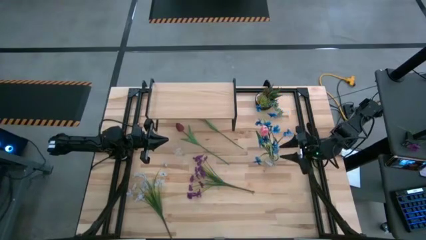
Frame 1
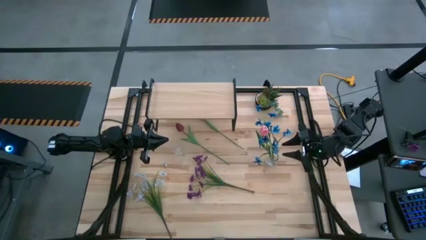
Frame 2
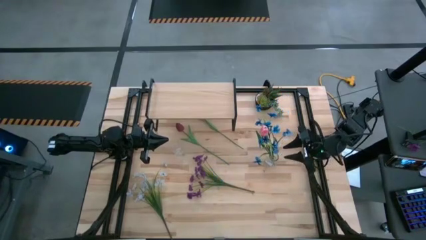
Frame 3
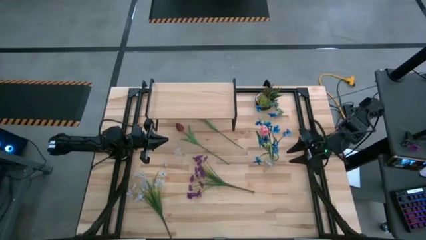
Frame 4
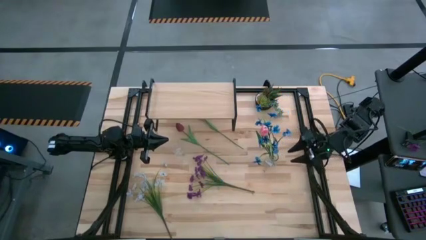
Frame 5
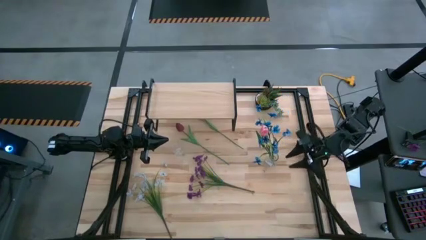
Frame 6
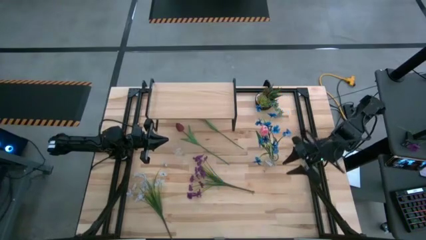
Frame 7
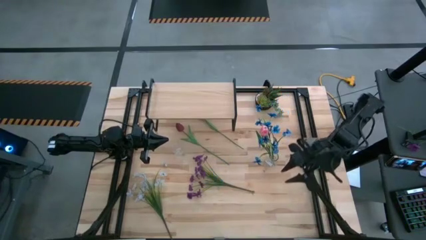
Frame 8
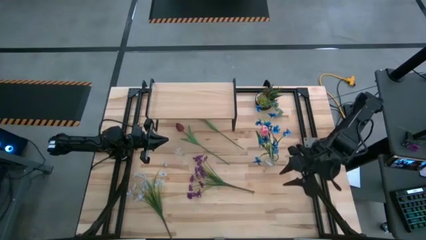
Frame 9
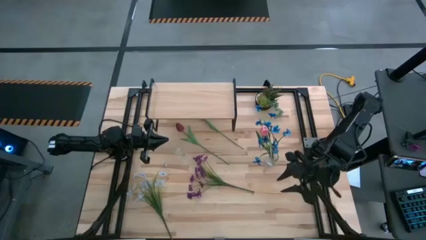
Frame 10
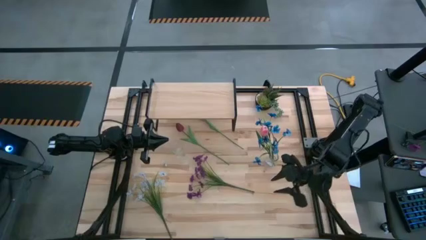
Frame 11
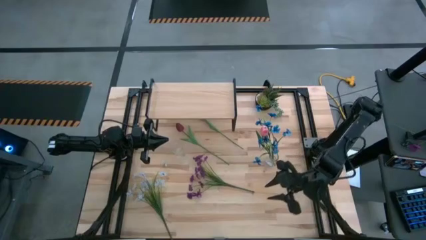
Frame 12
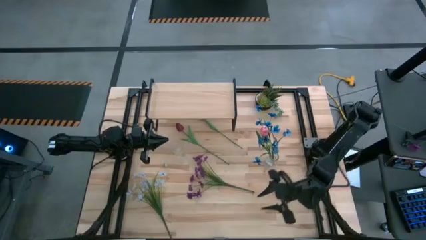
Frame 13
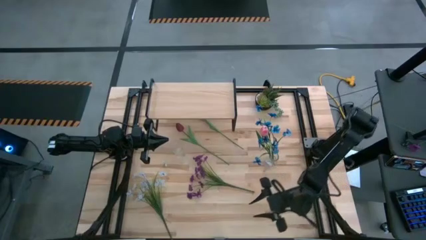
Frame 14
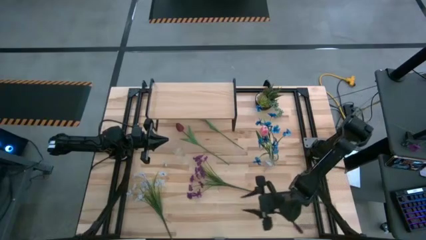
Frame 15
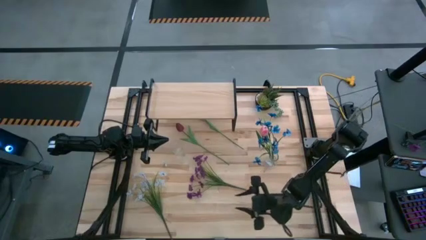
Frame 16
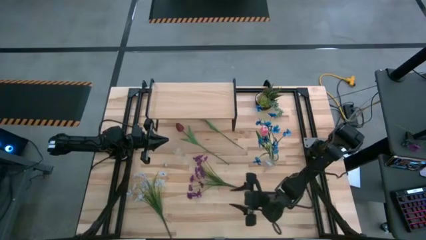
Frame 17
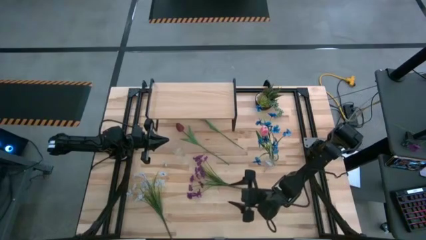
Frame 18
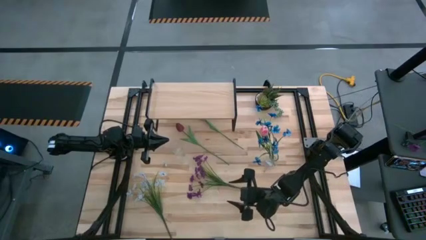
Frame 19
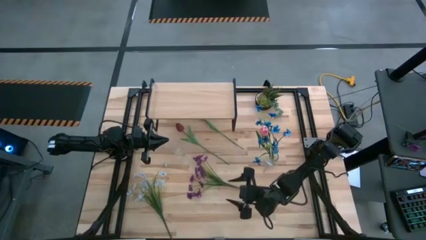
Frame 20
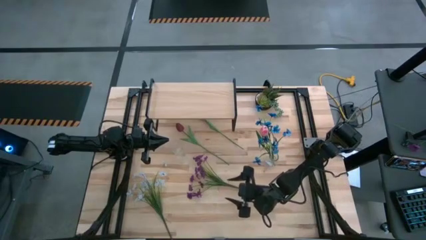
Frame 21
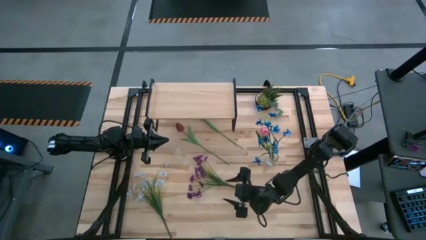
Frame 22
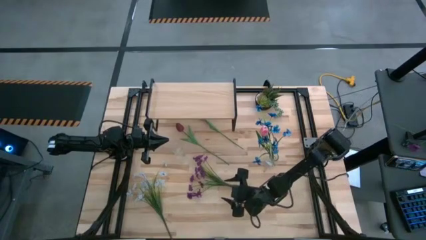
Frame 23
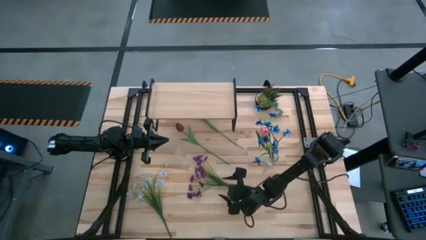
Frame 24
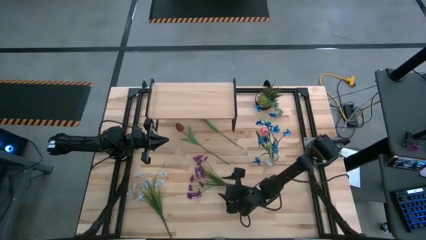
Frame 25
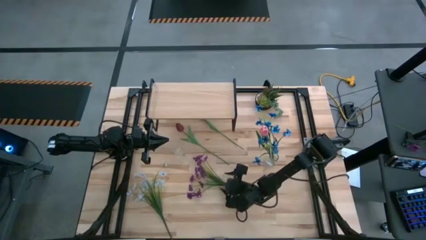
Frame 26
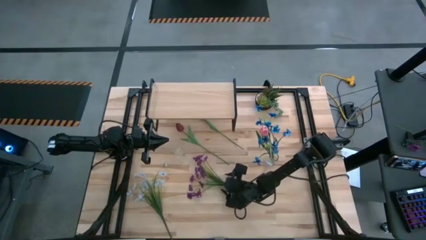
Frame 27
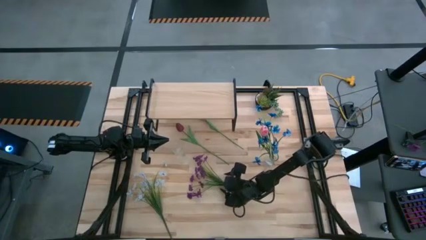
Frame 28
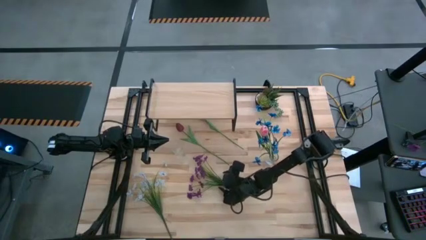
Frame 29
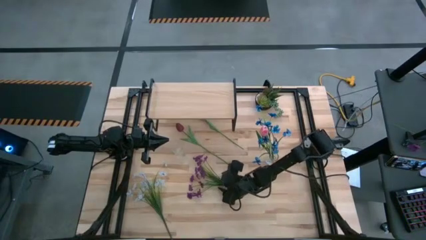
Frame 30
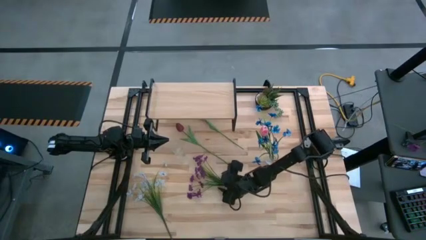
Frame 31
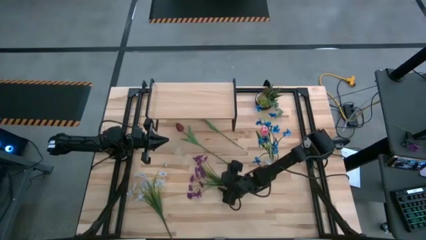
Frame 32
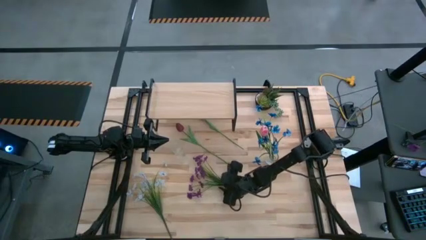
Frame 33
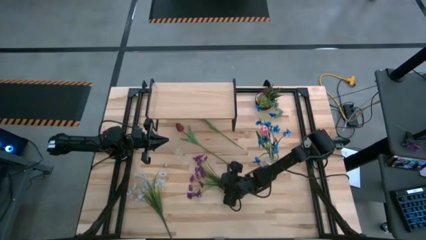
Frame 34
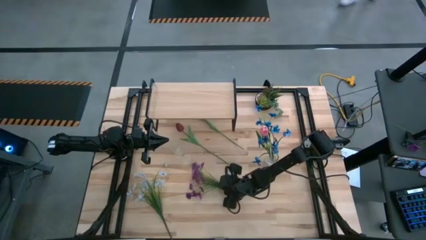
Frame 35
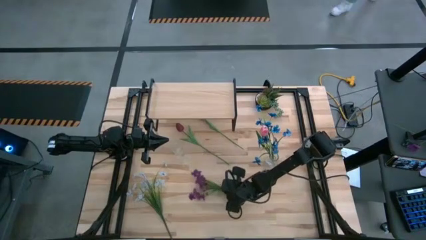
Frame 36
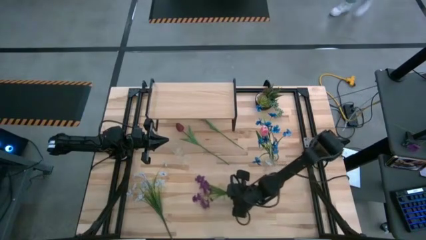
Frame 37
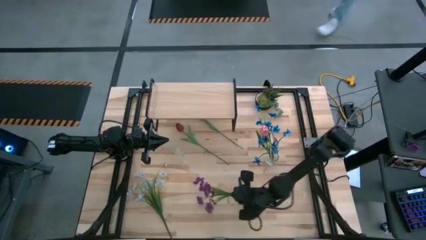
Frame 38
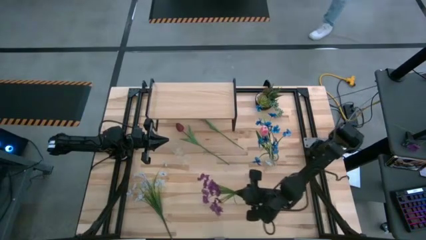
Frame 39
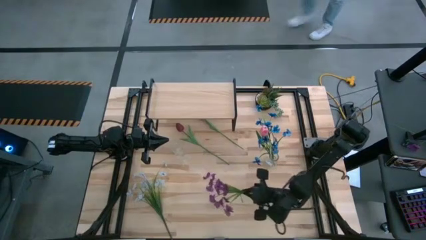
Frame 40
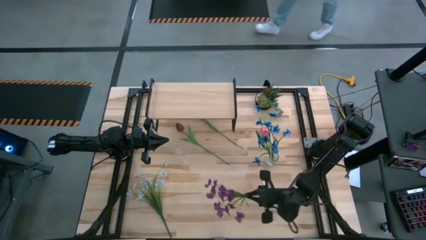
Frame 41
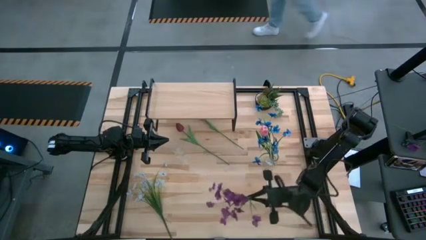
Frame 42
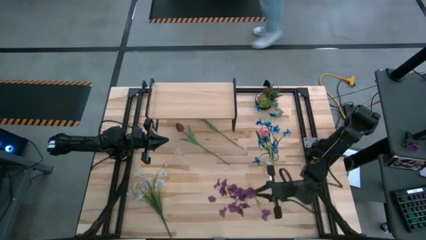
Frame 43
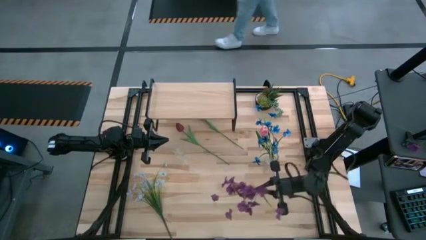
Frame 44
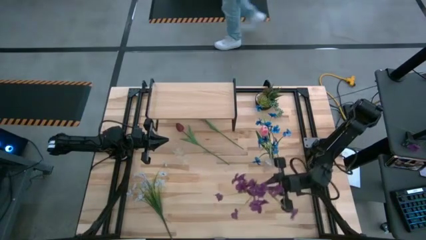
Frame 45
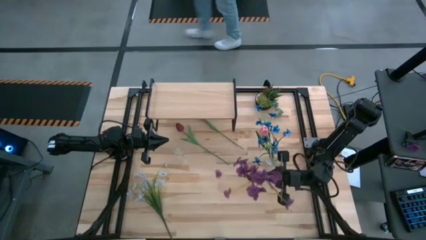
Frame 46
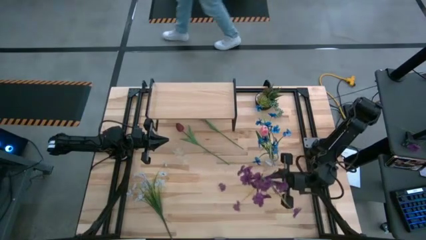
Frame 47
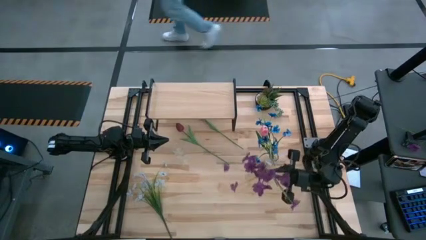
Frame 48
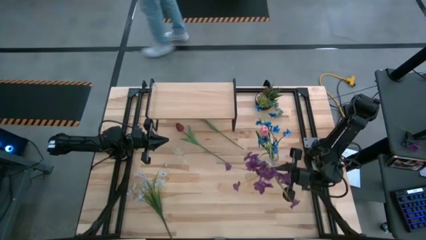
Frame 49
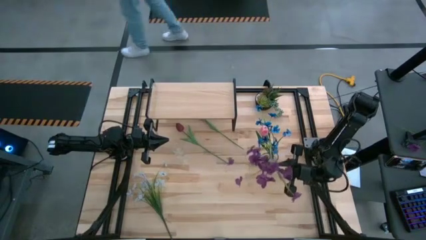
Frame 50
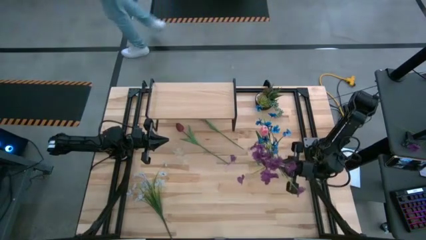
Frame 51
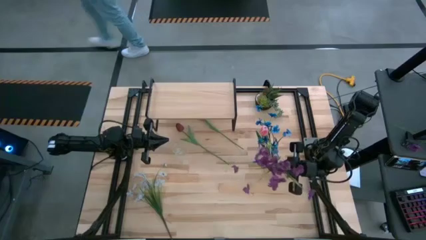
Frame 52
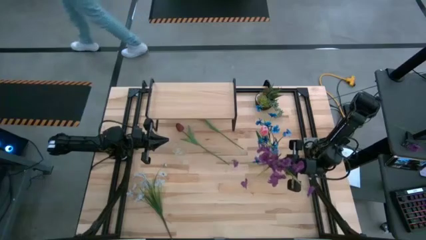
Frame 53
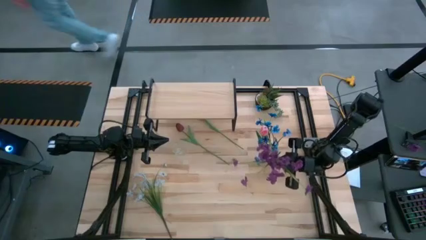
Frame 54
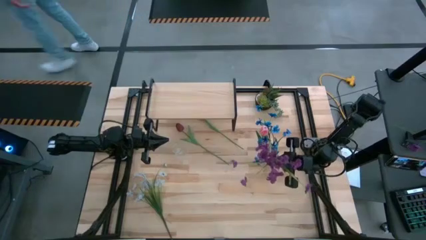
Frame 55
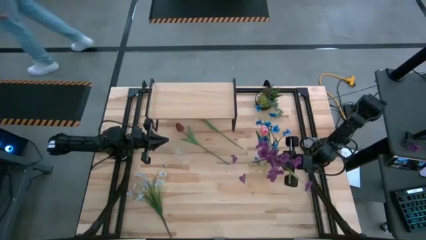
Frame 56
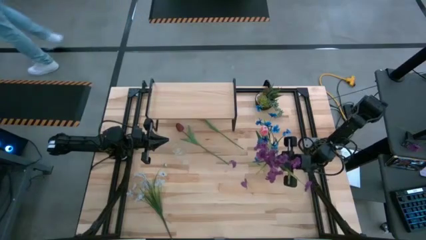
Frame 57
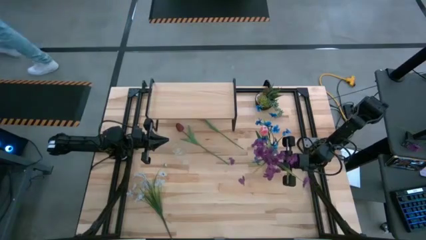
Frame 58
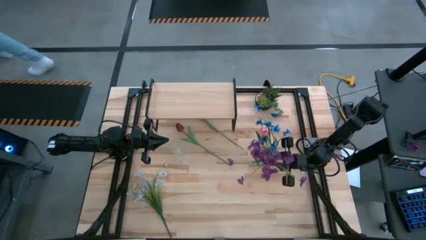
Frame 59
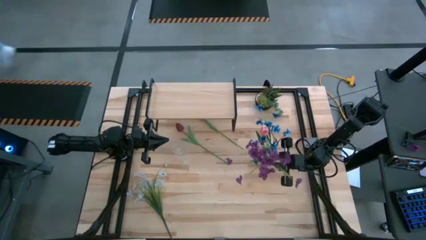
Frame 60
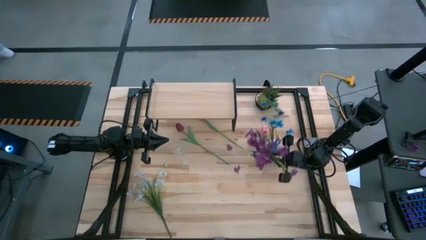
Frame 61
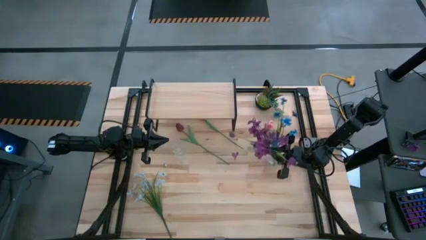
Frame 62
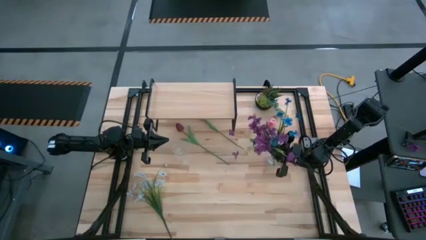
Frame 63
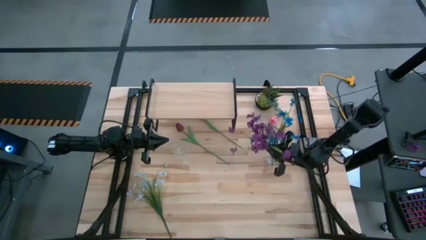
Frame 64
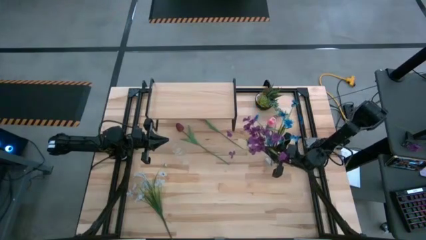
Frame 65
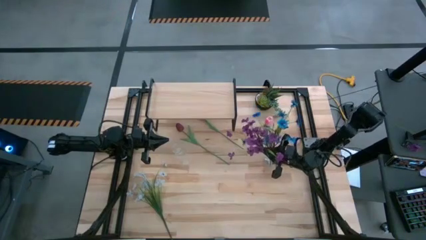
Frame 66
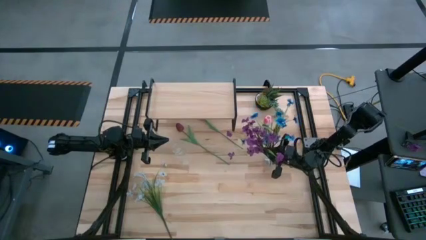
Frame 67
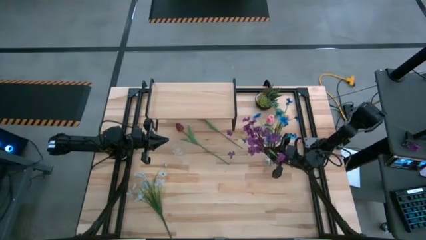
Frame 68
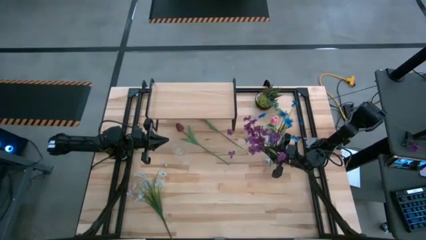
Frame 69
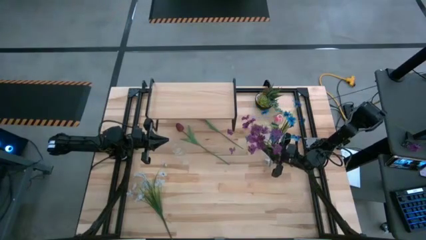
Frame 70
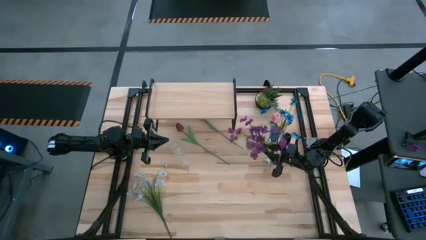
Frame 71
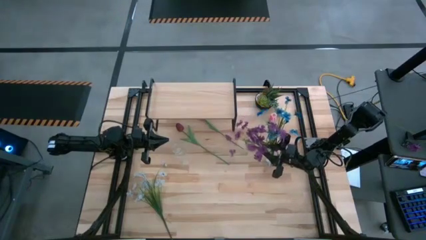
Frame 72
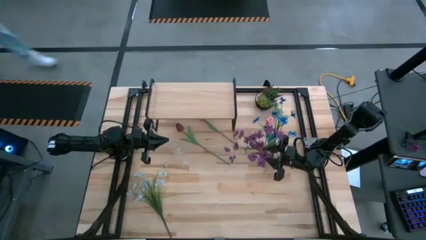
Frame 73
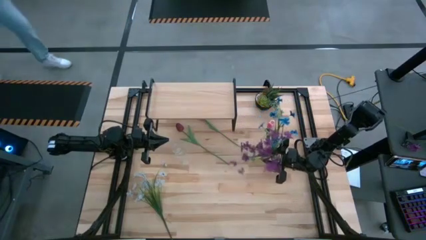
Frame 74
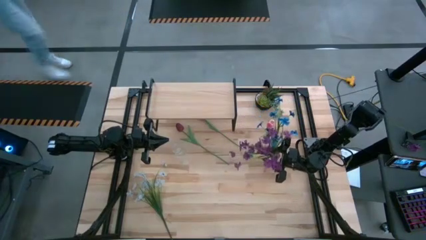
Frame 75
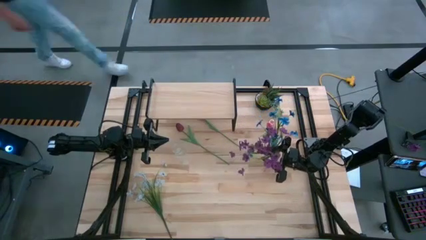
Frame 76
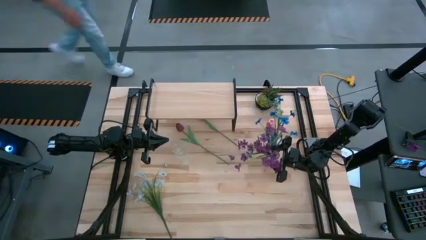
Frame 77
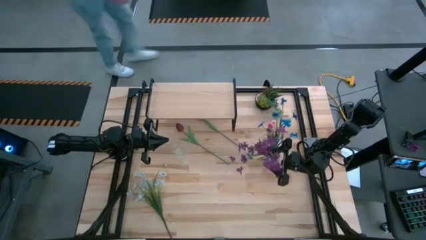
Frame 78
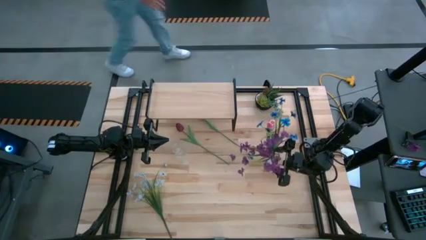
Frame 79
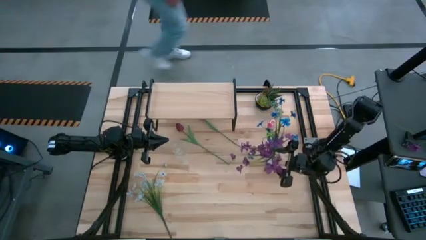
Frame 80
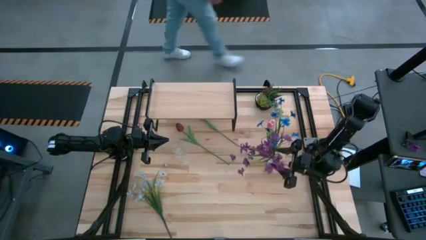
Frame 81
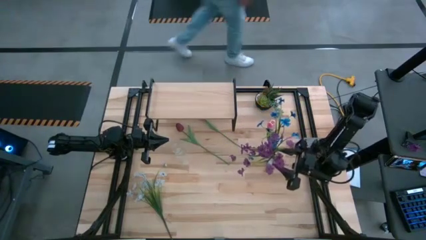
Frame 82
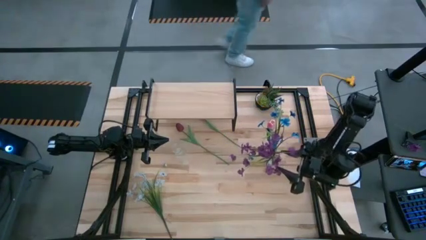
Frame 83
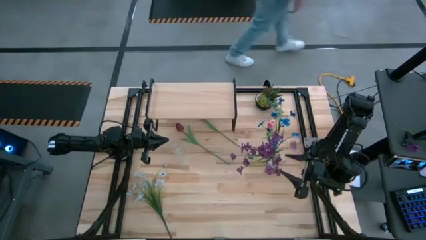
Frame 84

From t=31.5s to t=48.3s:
Task: Pick and place flowers into a vace then onto a shelf
Put the purple flowers into the right transparent vase
